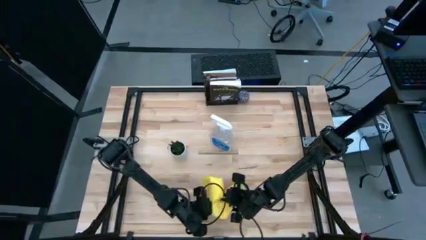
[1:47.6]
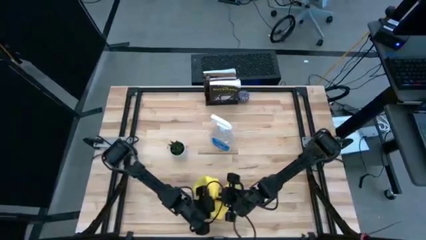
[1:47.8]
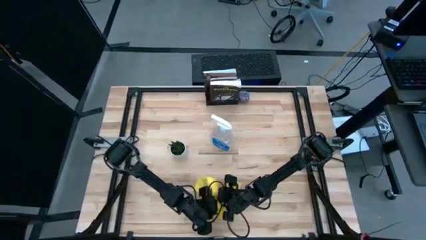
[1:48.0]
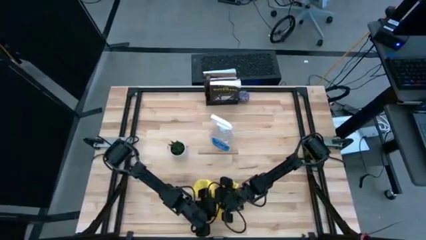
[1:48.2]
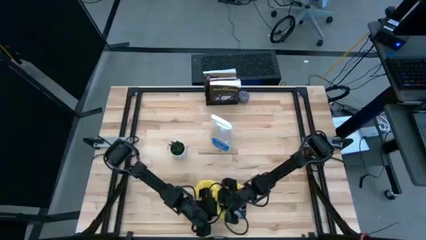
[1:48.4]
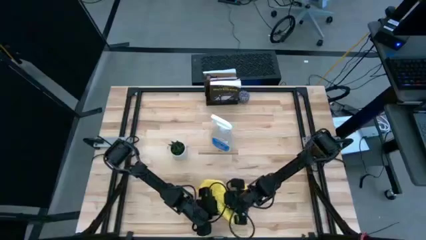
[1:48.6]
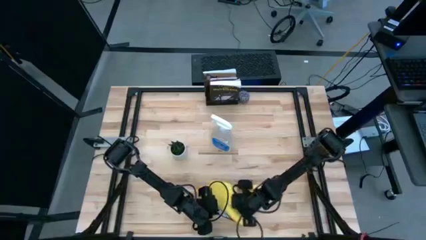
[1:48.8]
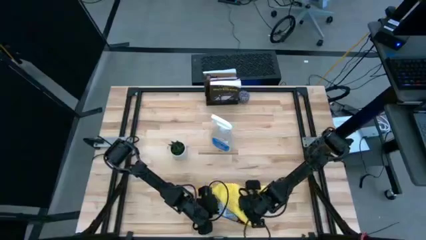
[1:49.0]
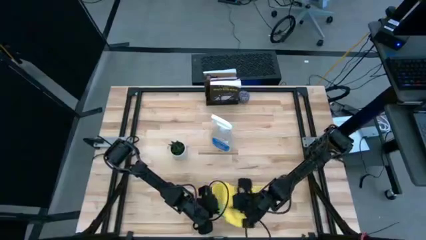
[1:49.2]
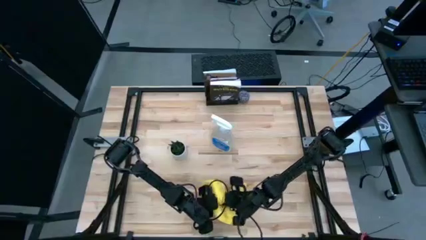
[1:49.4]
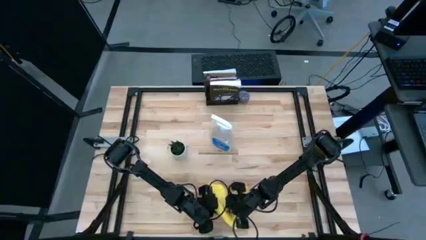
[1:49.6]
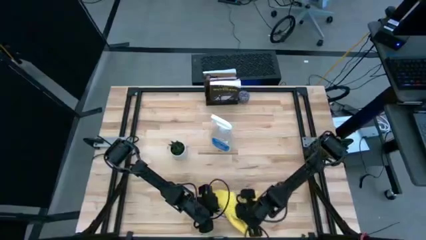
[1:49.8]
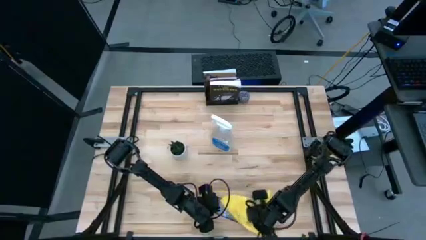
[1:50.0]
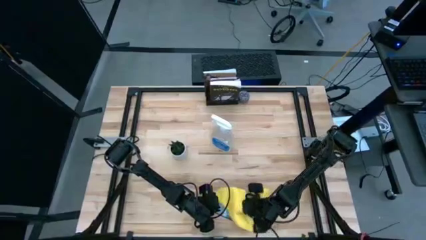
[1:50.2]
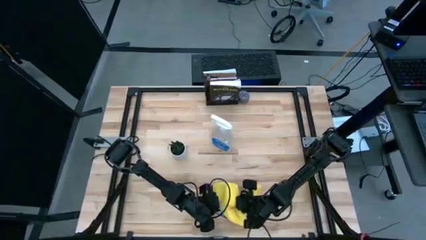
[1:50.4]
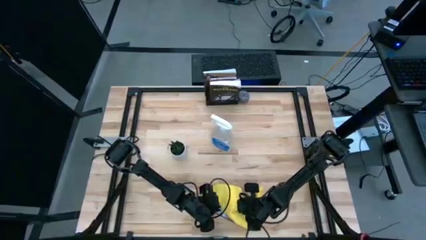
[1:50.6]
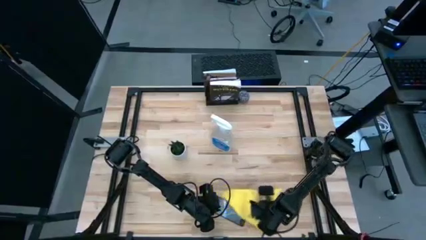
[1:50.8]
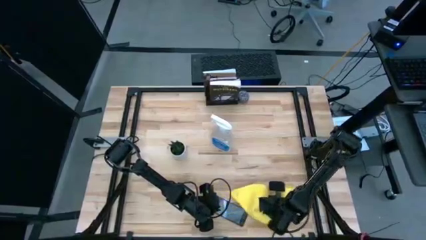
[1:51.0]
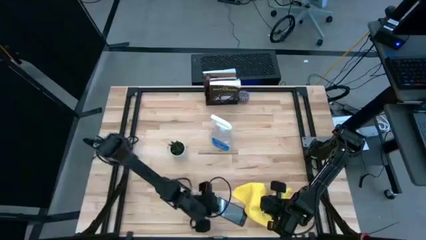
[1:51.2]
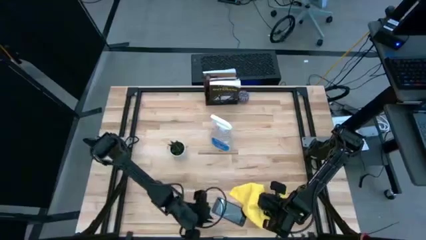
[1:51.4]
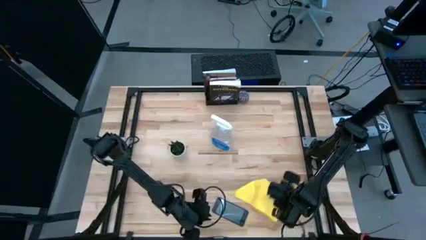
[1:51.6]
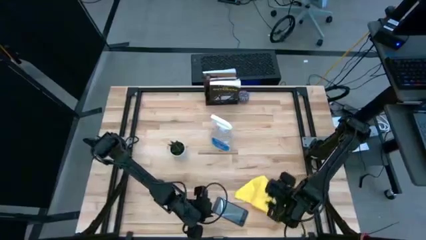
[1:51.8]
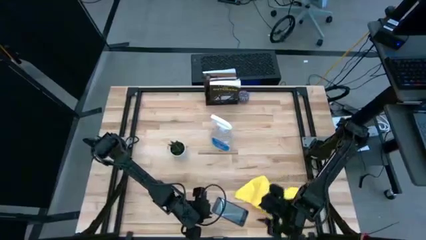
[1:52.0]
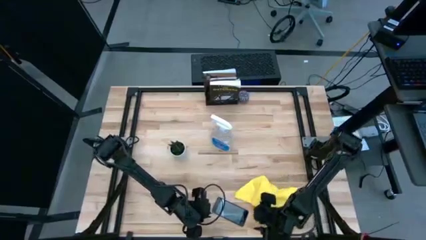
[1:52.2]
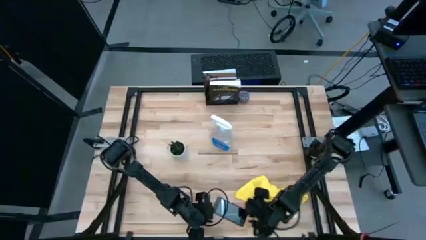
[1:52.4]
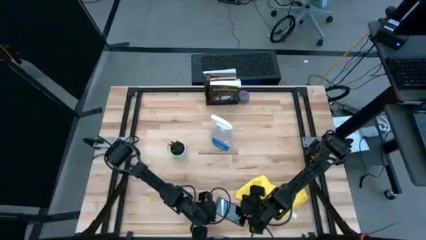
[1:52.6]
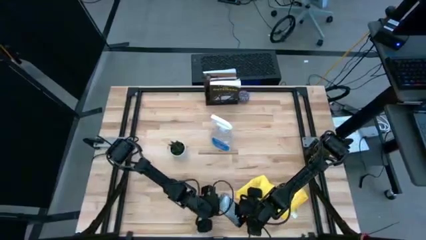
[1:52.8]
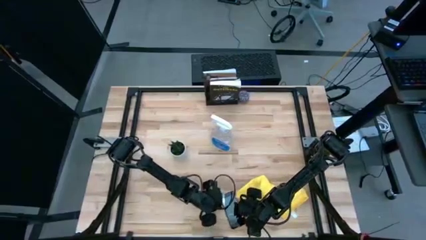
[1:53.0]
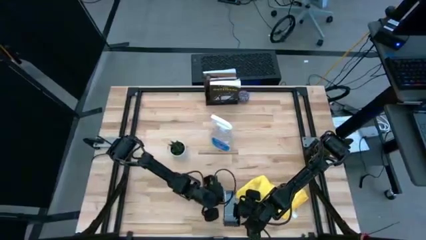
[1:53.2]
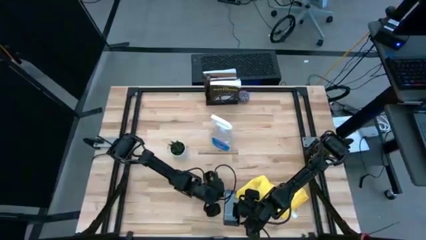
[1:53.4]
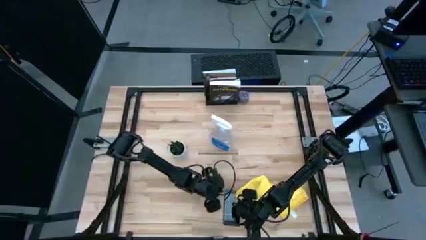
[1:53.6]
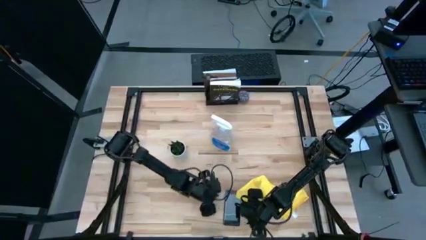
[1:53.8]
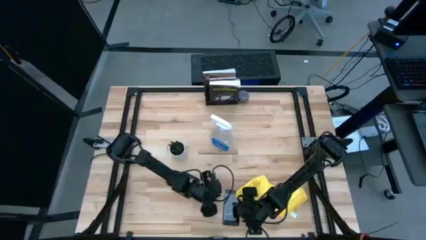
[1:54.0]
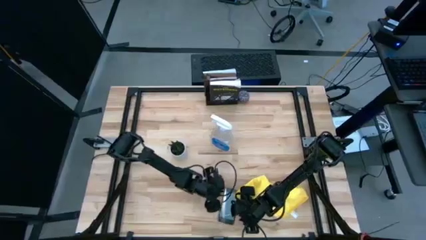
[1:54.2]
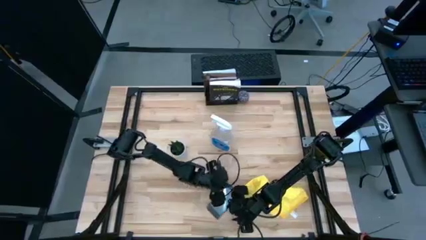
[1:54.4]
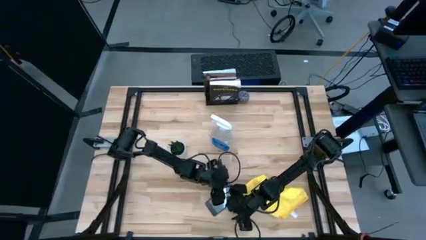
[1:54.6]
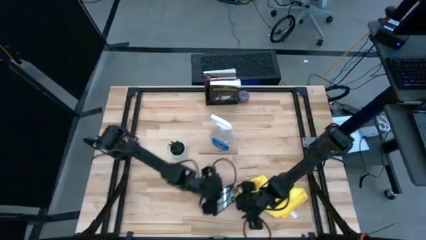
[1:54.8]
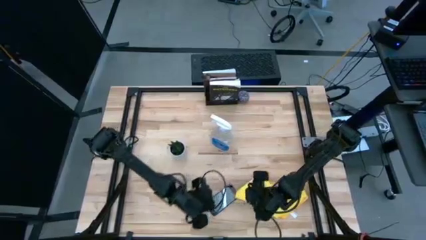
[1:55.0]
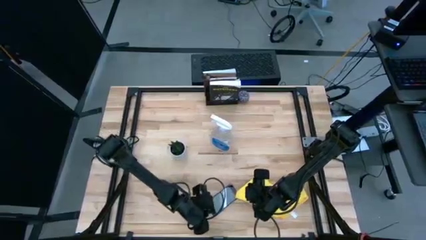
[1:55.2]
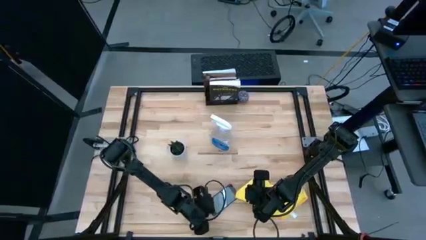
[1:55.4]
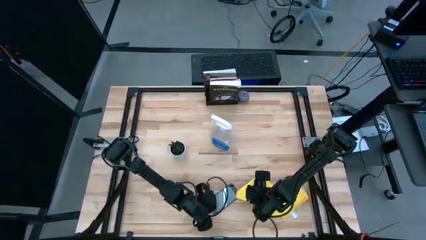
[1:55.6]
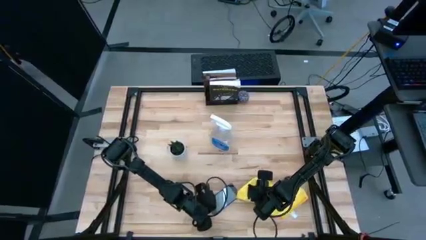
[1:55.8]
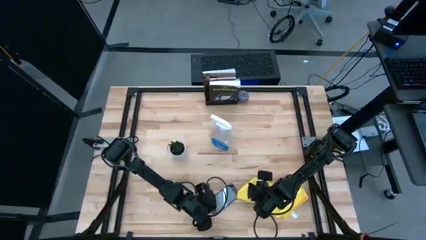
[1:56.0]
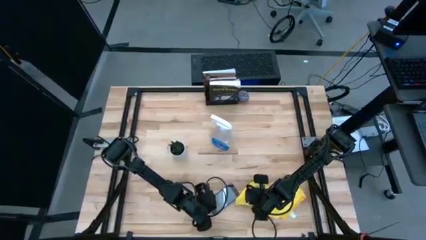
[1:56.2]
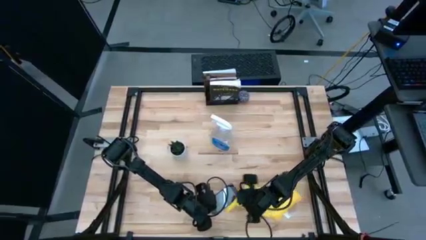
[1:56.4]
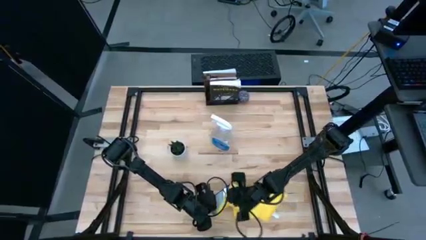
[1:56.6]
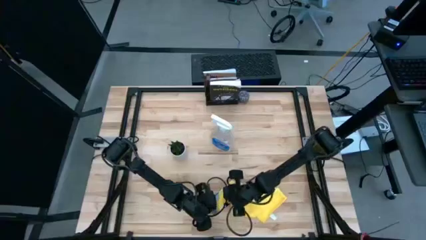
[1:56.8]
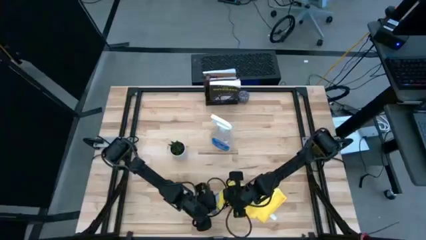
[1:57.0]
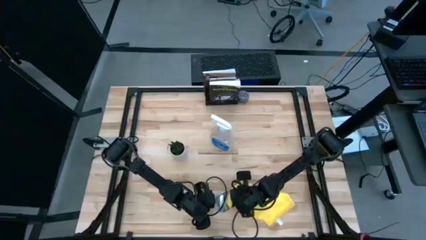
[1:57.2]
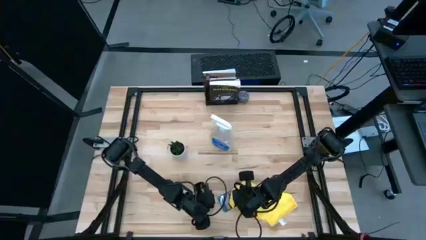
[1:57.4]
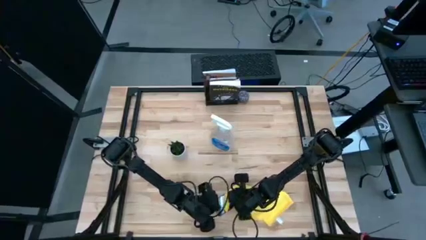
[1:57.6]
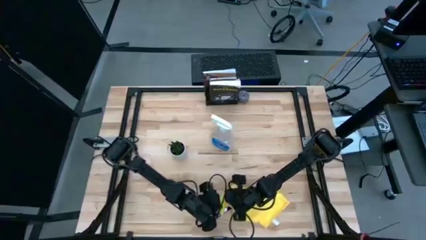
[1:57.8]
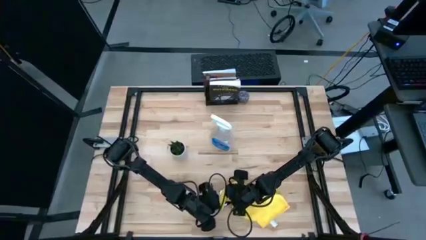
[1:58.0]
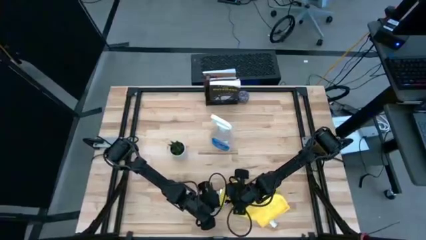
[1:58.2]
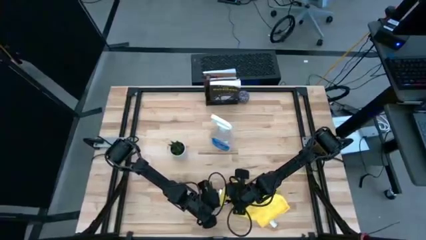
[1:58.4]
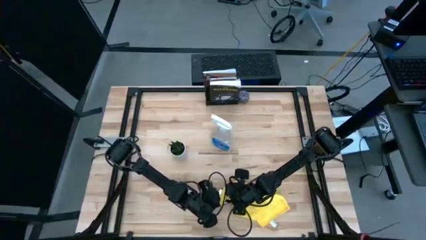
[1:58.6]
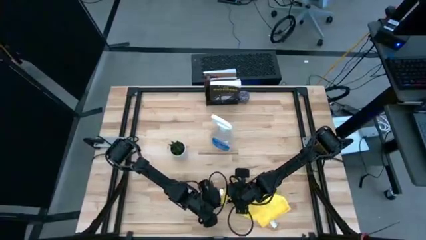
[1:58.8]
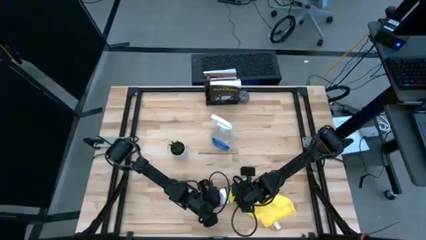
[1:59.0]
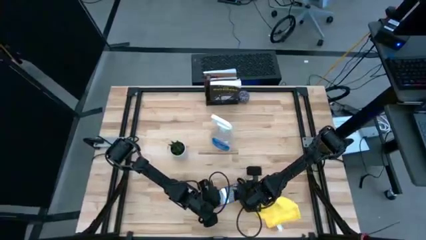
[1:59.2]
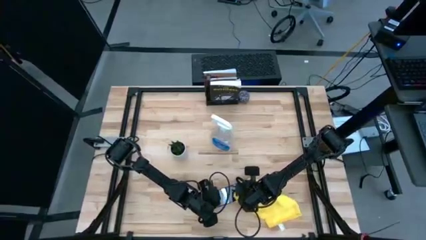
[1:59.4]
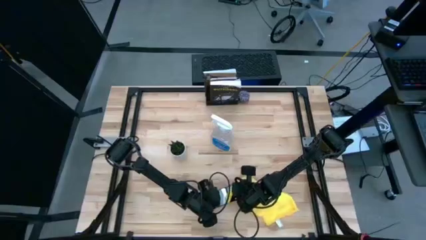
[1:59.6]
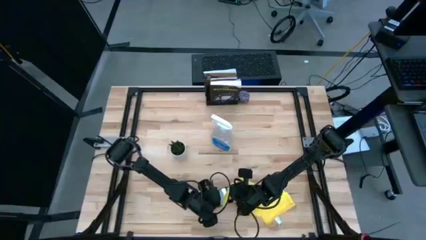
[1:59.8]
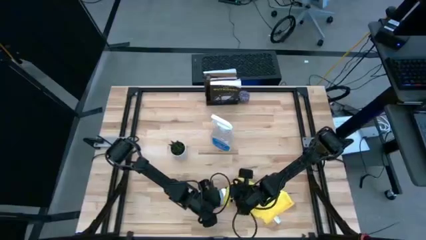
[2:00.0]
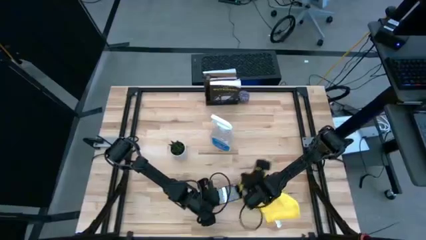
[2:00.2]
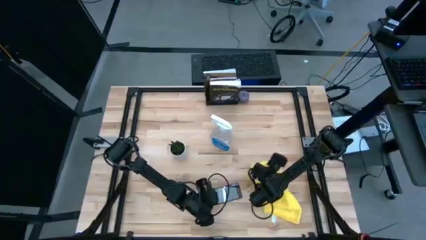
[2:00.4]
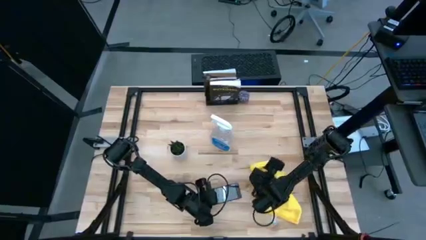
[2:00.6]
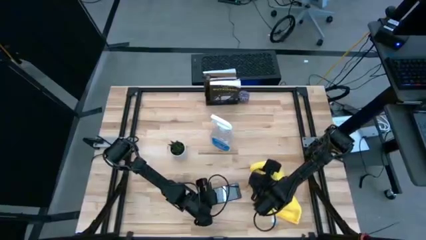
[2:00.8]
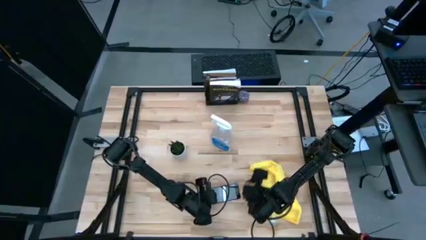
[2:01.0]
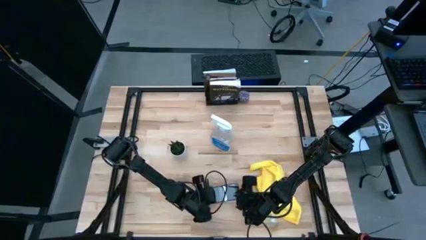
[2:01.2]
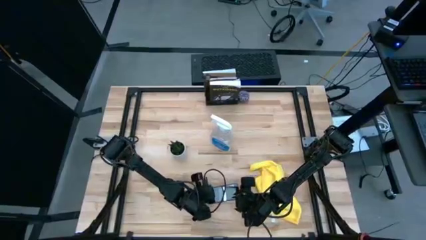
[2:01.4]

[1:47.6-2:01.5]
Task: Apply microfiber cloth
Wipe the front of the cellphone with a microfiber cloth

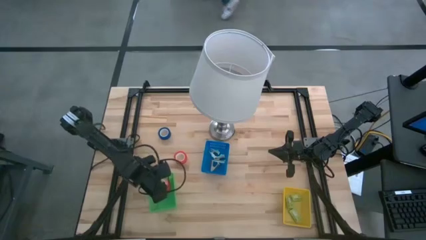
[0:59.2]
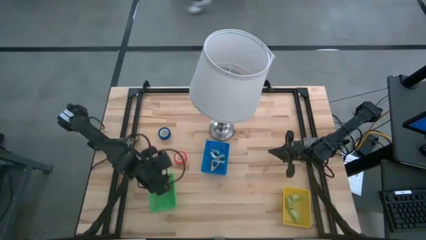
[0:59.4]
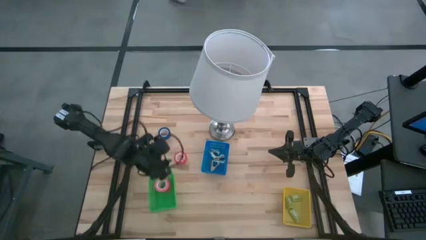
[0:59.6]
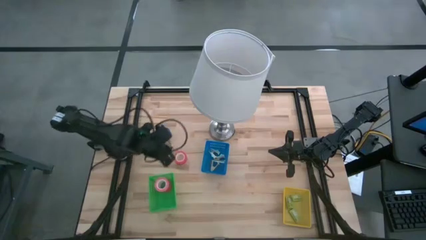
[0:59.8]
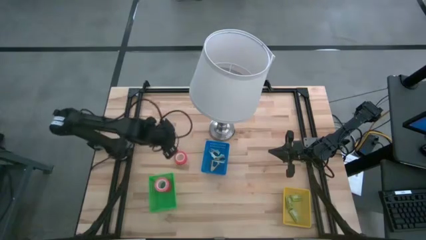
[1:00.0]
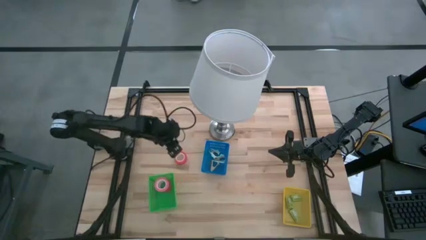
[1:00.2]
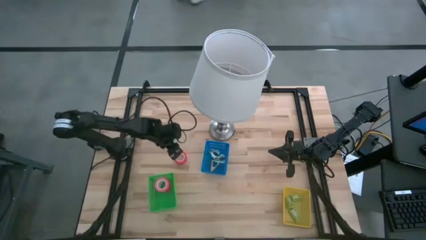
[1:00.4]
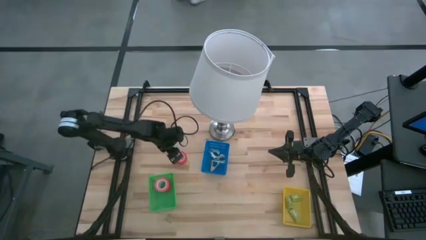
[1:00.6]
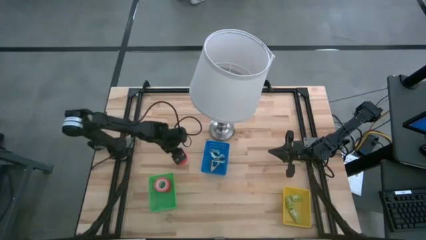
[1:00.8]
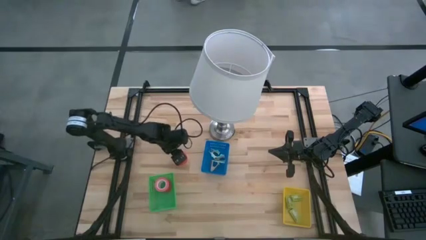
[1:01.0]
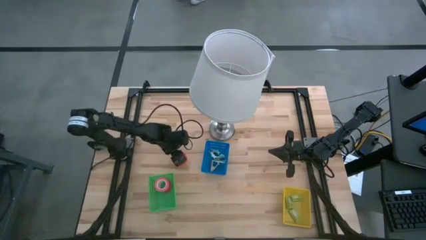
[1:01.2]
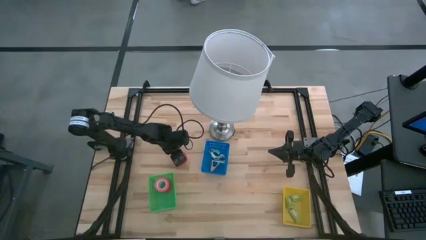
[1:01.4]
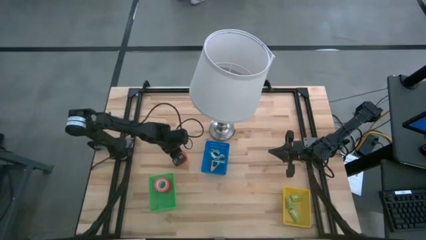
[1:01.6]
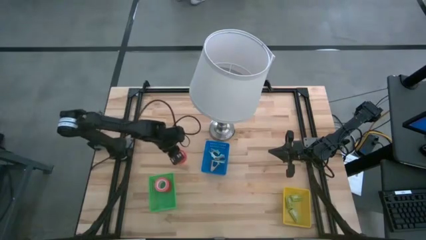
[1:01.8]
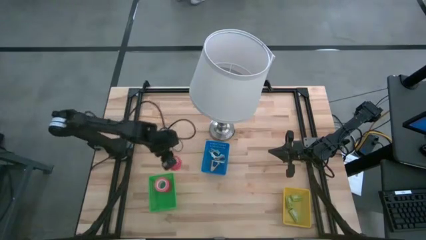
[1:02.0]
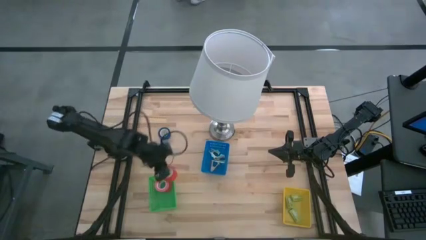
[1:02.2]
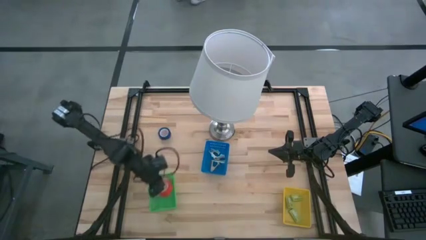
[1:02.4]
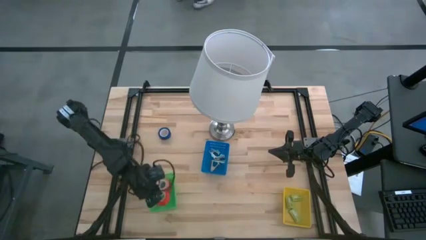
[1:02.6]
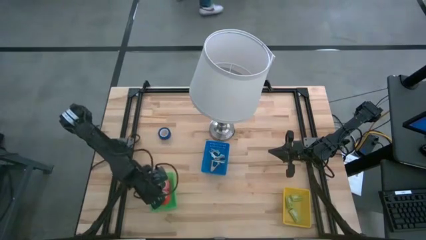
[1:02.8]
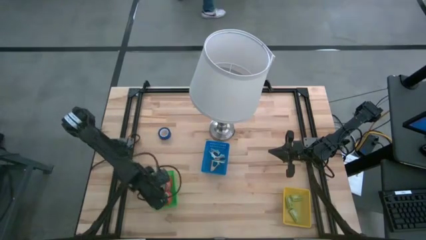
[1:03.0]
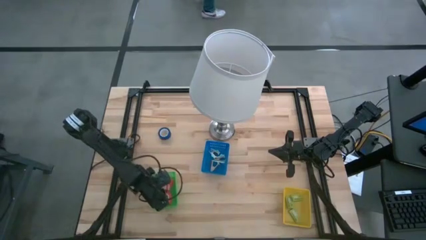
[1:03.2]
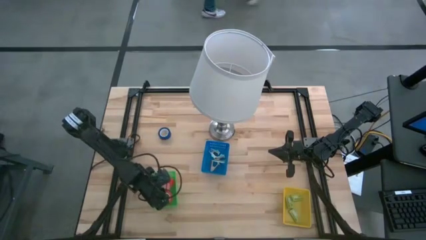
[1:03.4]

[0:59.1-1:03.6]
Task: Pick and place Stapler, Stapler remover, tape
Put the orange tape into the green bin
